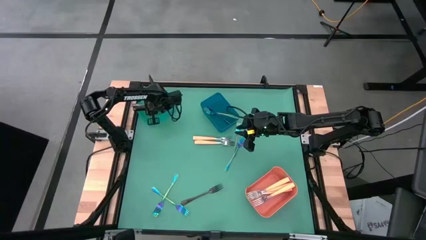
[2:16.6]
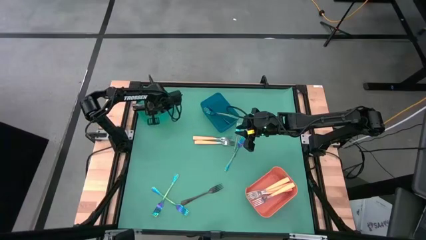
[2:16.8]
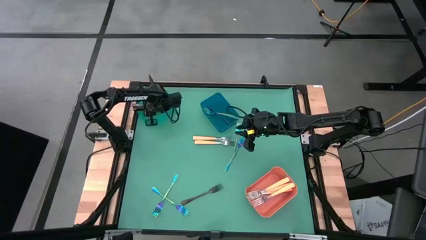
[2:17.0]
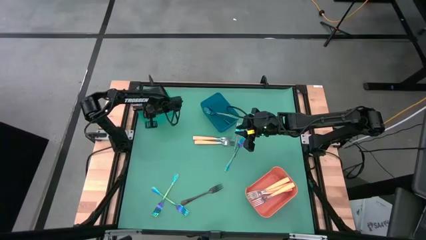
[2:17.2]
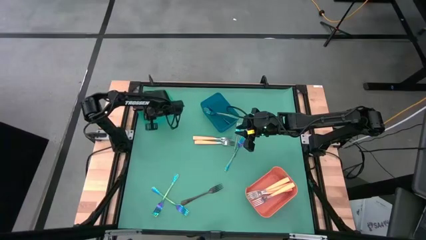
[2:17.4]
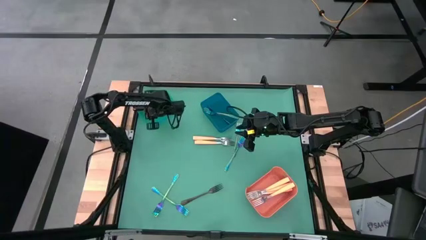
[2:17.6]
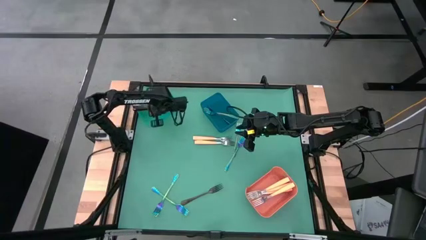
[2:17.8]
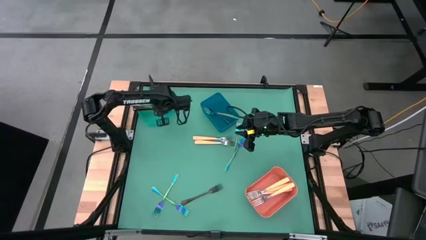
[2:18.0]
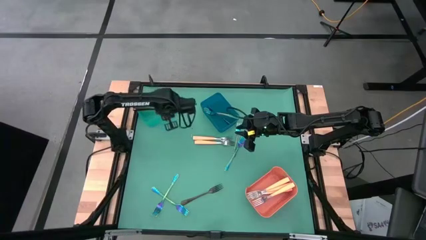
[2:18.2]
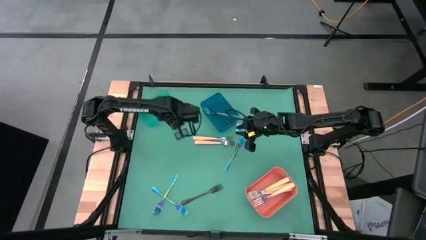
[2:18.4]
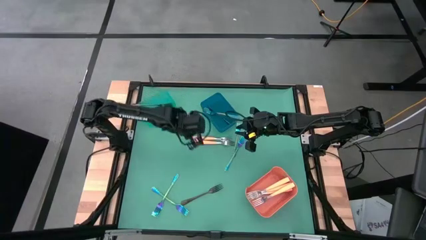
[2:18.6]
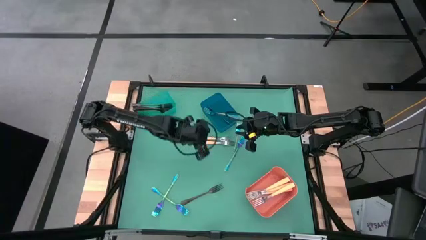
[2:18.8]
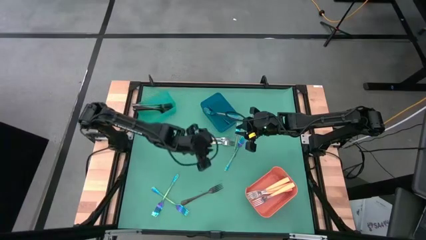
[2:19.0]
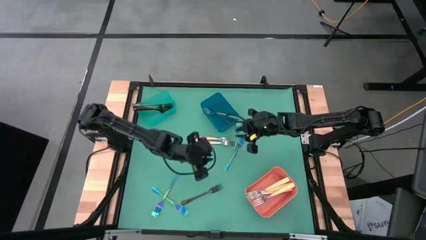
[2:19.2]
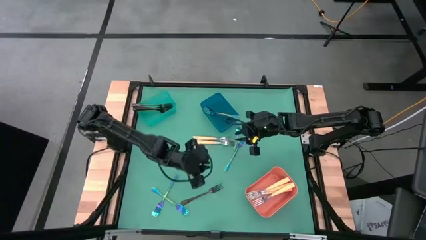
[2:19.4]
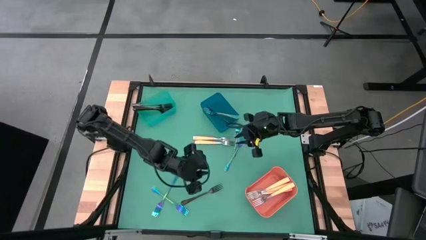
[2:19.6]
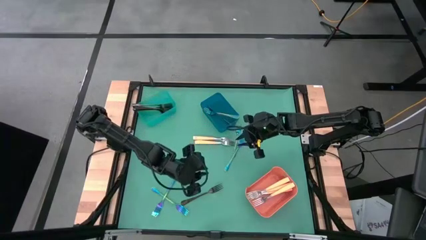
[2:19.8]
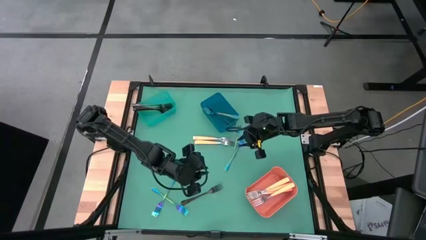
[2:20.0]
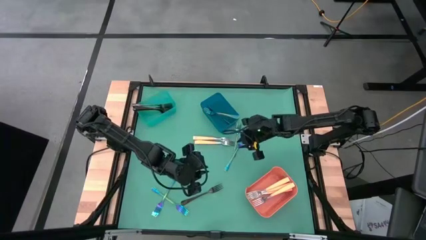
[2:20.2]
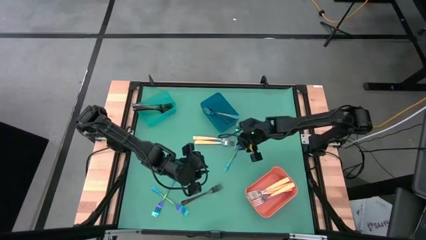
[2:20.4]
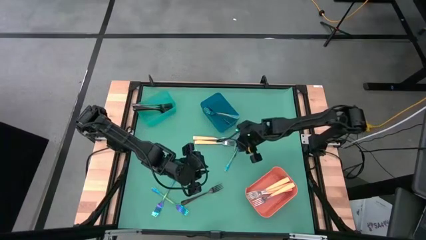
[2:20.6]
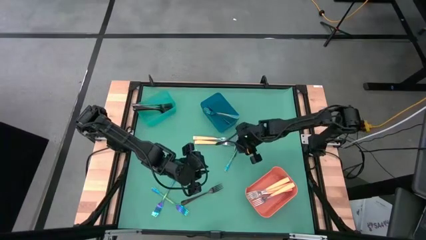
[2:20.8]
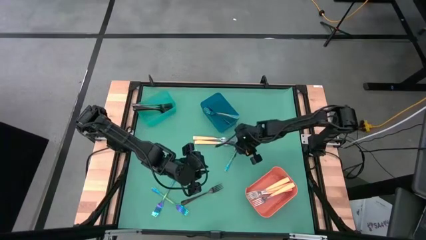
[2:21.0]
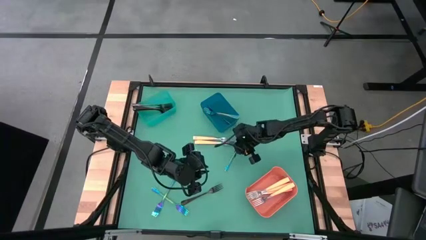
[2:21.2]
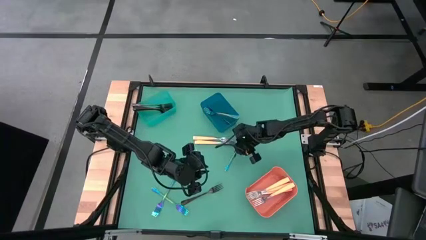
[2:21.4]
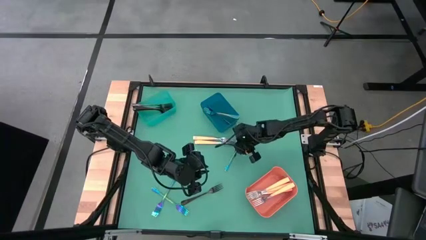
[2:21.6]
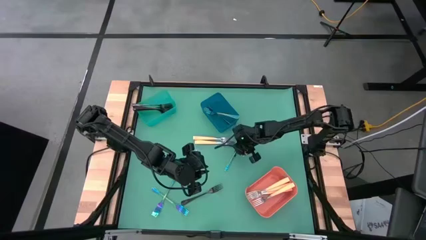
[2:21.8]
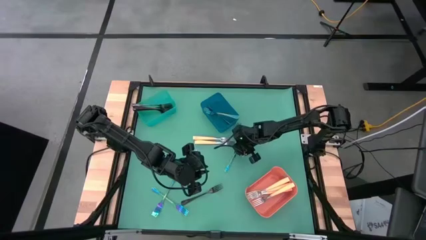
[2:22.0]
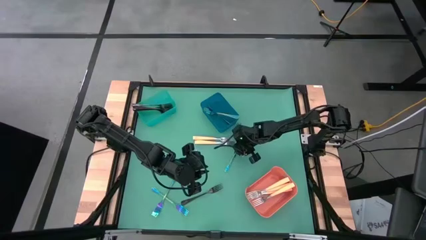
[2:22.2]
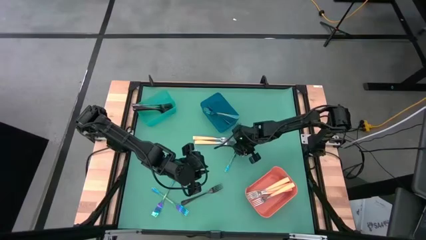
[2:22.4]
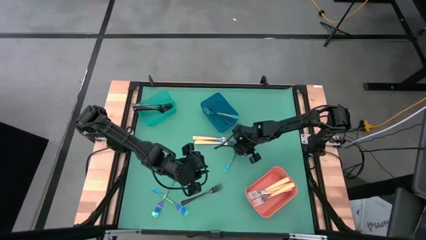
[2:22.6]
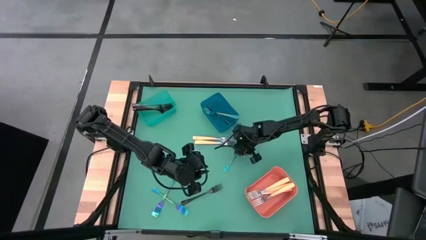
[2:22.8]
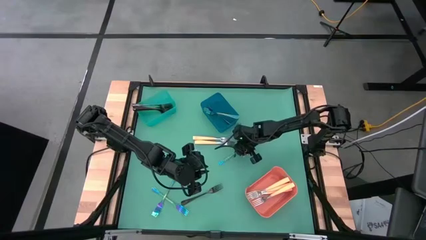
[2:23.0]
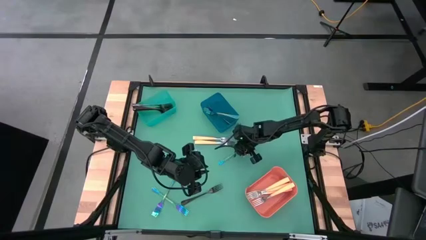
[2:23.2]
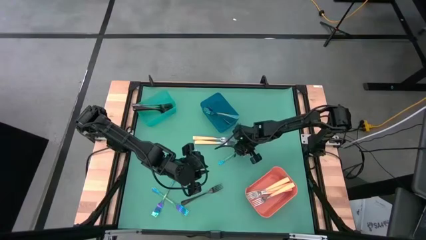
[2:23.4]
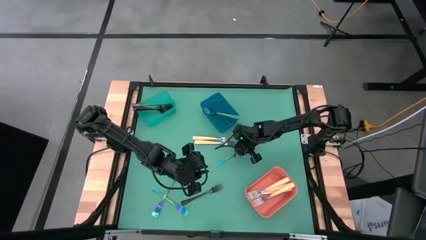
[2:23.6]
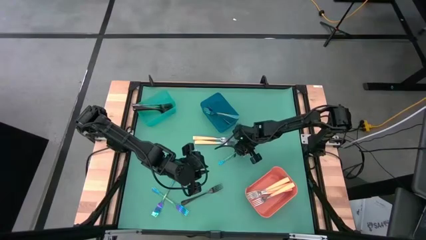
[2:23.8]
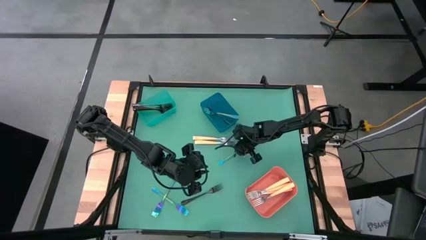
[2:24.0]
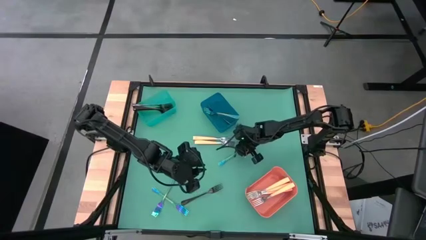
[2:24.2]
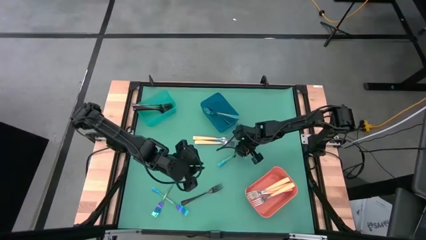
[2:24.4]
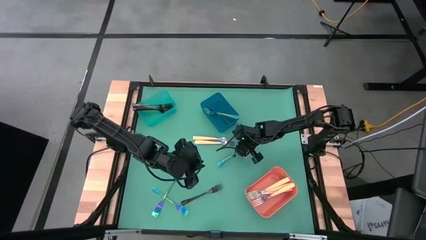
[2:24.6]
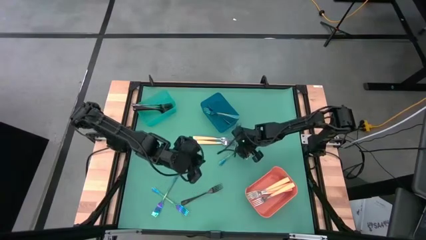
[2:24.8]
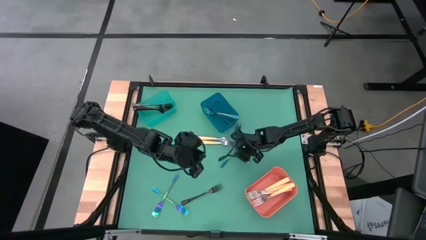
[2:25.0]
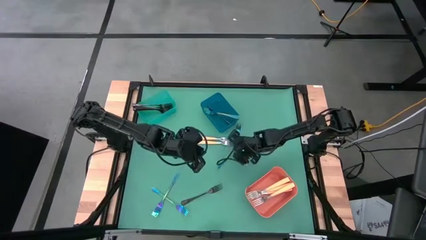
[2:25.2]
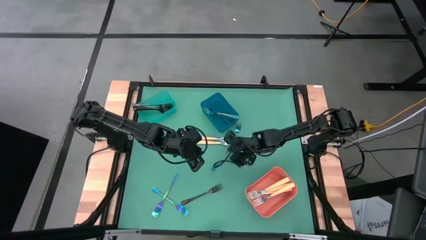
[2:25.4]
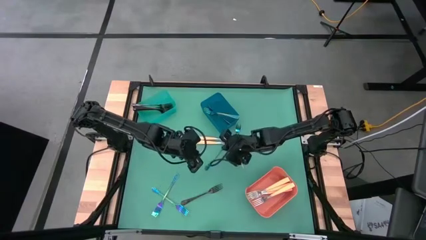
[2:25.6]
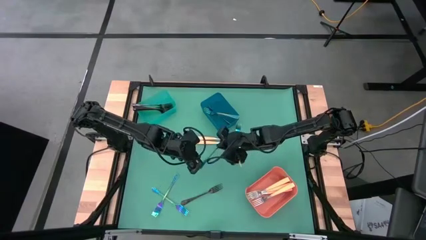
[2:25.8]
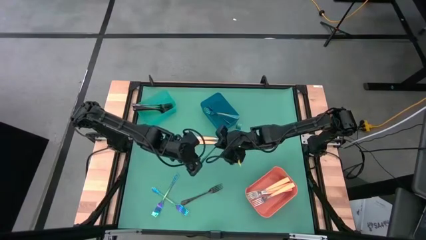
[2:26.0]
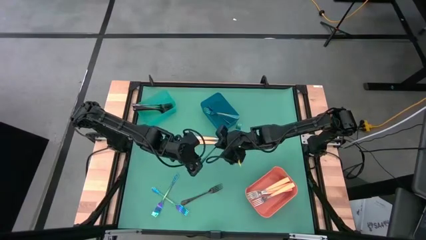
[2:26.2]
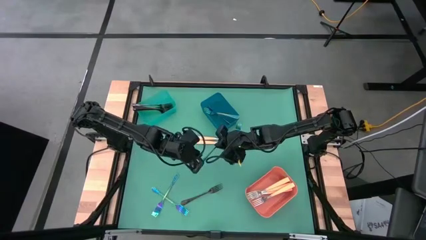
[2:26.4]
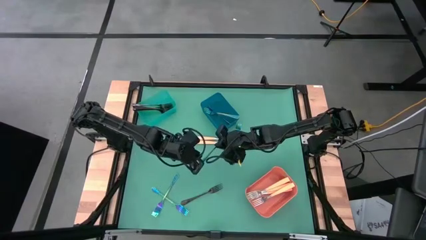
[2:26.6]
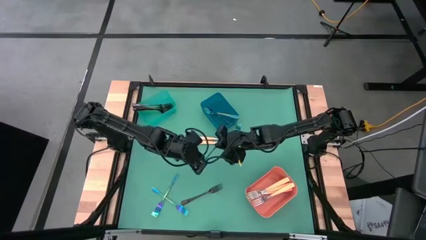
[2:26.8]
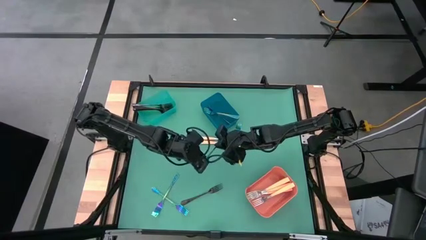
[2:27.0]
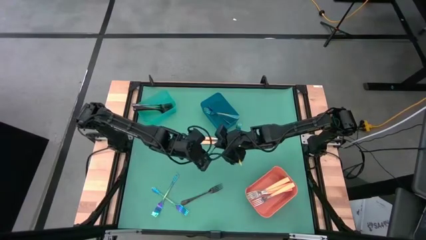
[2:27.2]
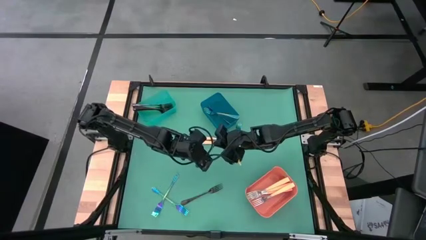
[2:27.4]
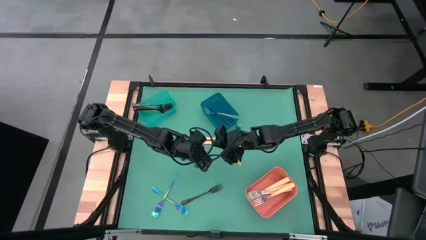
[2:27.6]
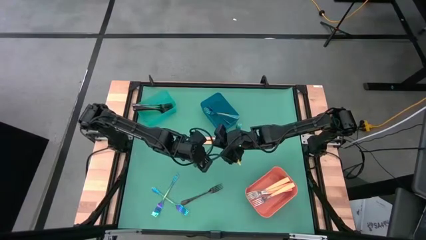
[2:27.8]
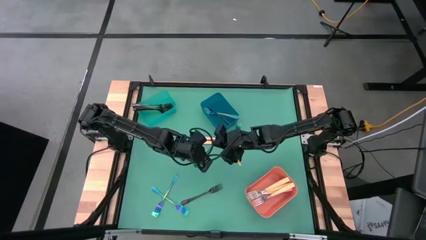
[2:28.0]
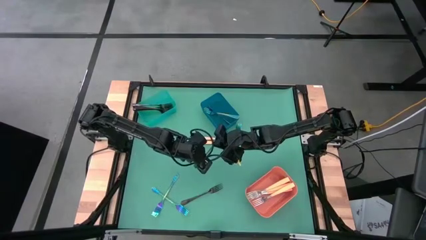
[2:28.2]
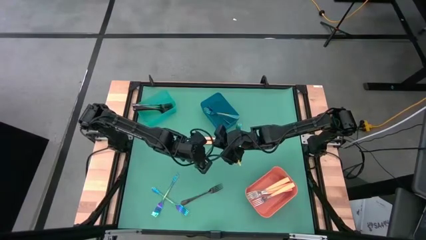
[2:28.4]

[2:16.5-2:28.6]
Task: Sort silverware by color (type)
Put the purple fork into the blue bin

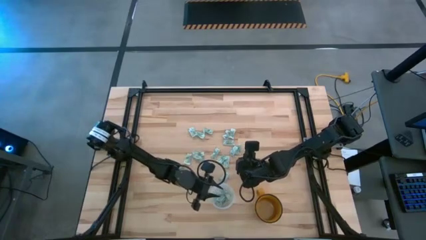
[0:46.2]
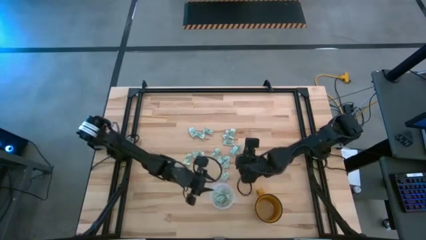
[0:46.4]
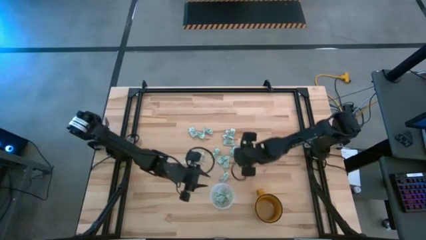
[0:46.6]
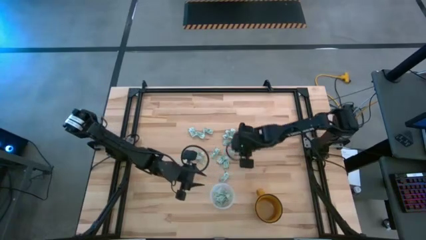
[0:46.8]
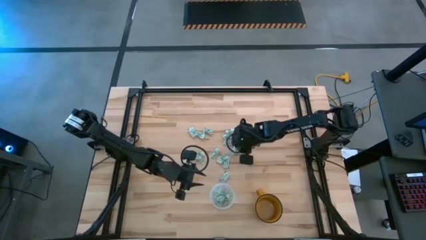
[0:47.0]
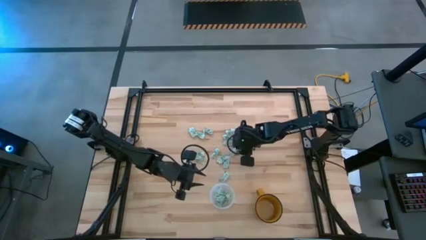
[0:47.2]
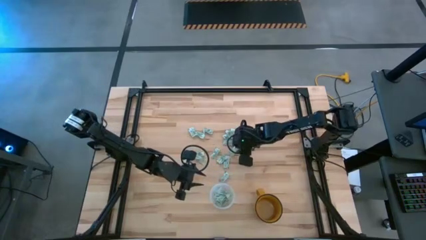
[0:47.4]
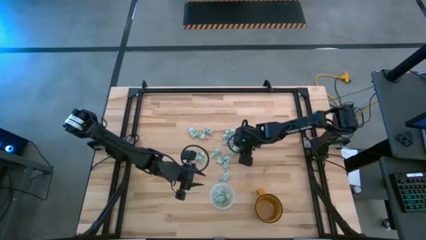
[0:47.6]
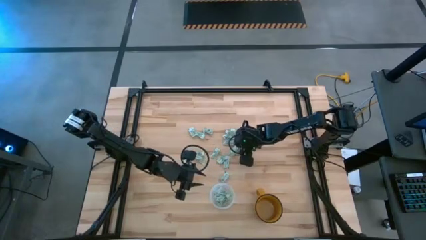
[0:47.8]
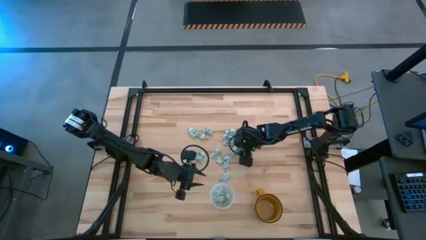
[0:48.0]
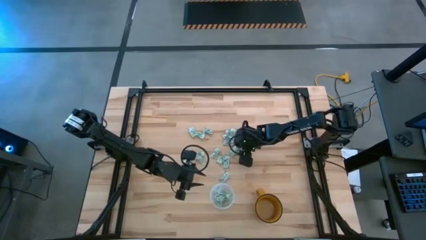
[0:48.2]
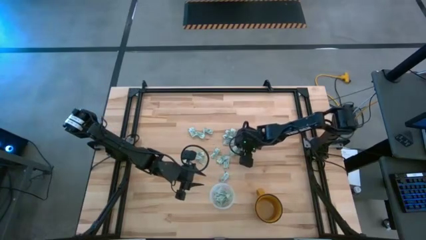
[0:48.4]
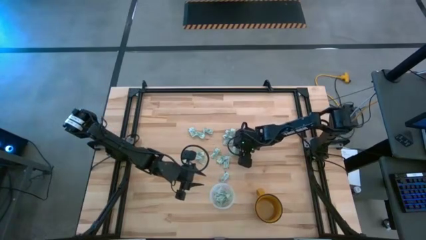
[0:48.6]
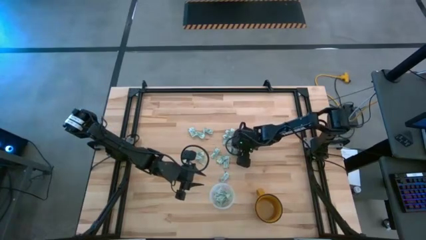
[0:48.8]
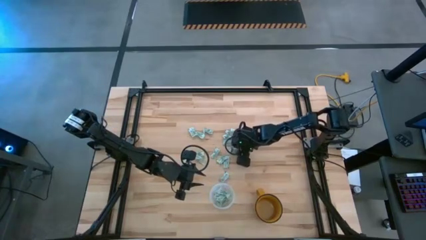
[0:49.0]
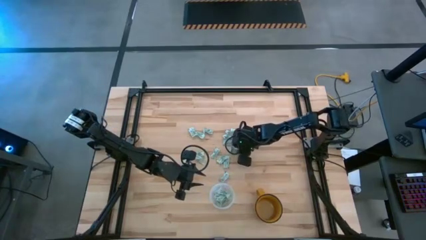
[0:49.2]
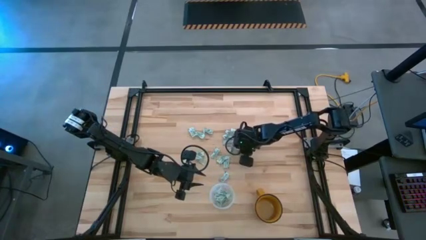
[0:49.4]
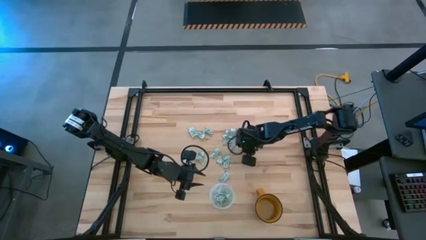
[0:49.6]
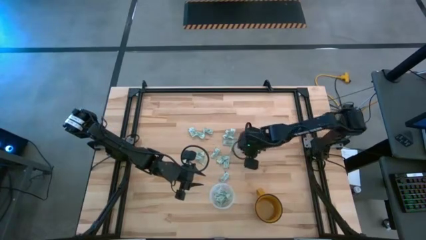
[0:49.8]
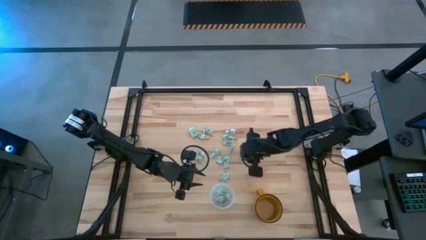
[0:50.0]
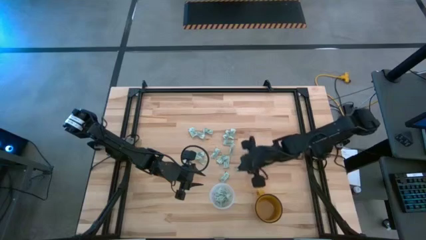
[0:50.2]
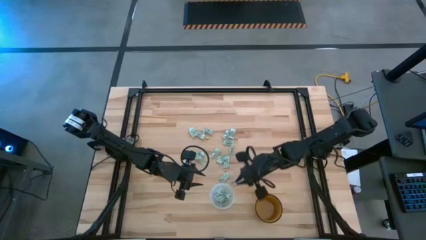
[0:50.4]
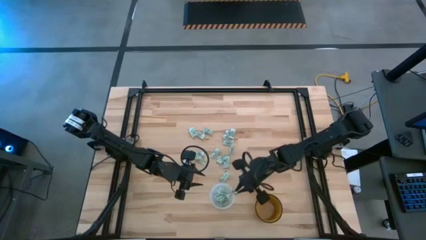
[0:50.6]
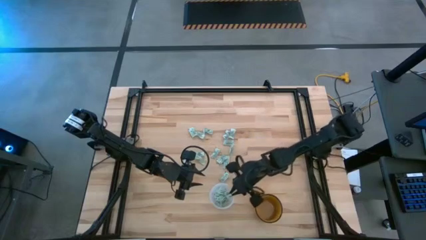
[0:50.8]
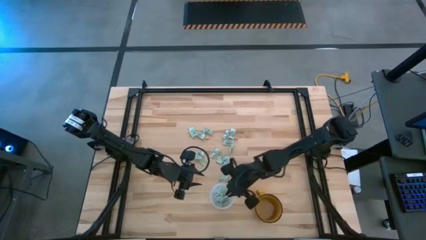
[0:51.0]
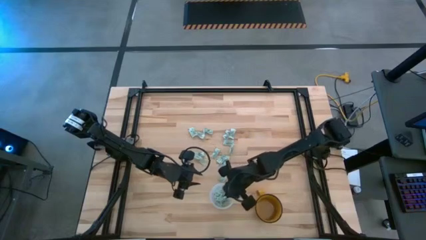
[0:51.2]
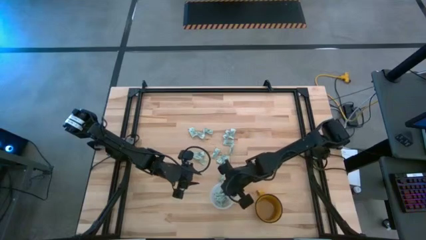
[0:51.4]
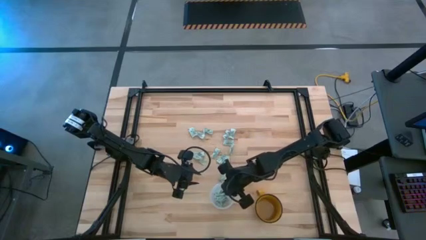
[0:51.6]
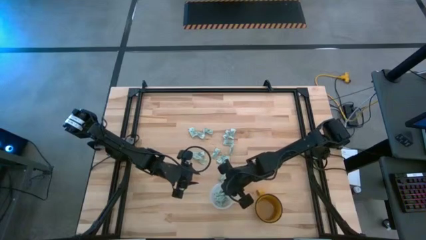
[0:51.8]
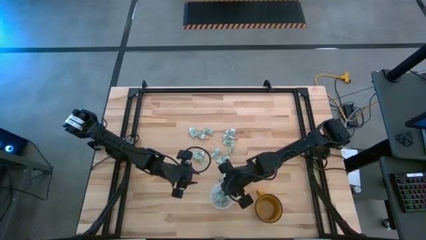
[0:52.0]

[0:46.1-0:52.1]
Task: Pick and place Stevia / Truvia into bins
Put the stevia packet into the transparent bin
